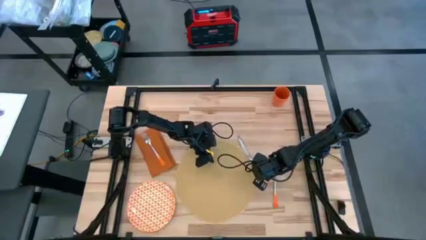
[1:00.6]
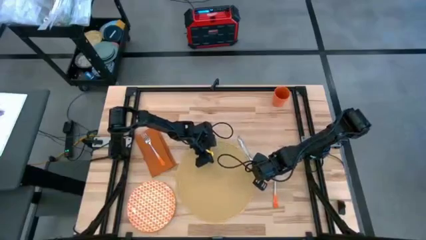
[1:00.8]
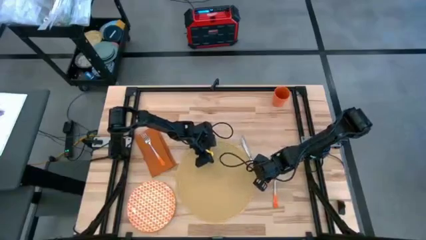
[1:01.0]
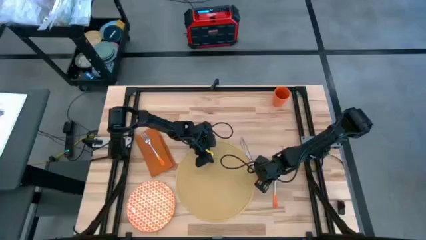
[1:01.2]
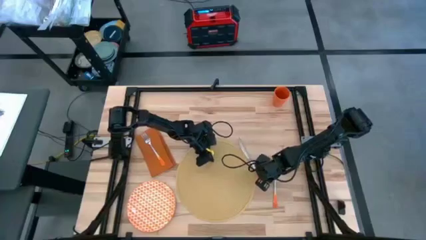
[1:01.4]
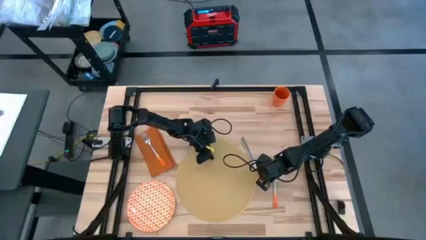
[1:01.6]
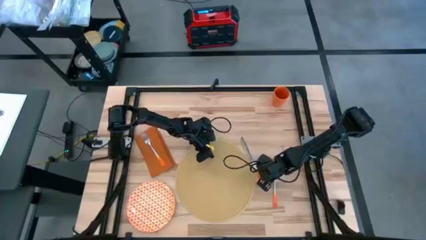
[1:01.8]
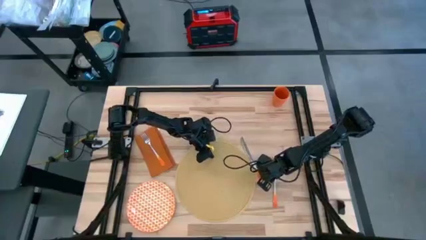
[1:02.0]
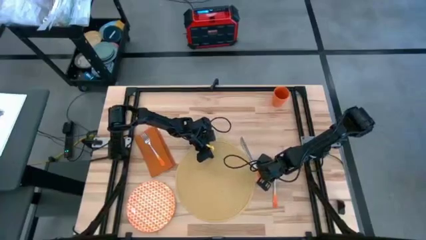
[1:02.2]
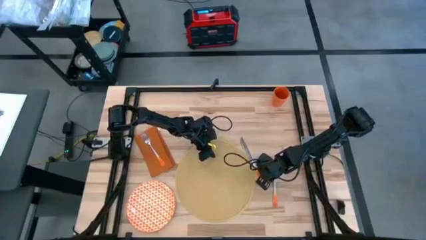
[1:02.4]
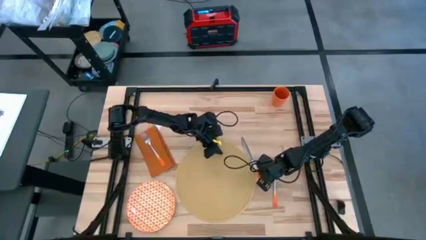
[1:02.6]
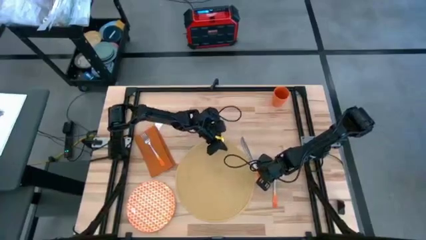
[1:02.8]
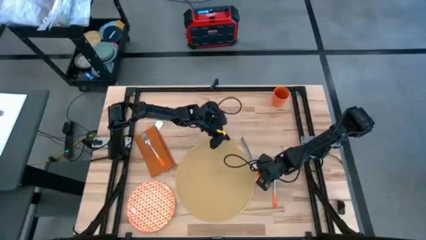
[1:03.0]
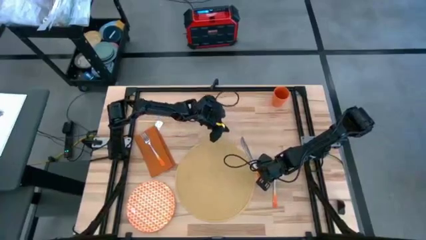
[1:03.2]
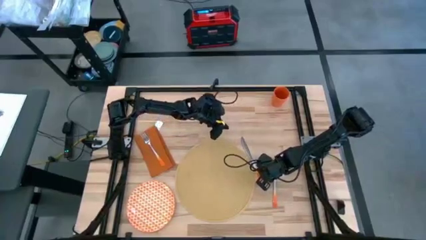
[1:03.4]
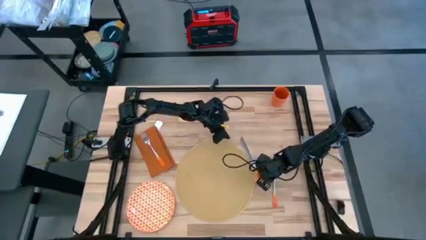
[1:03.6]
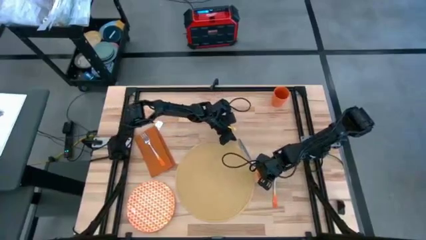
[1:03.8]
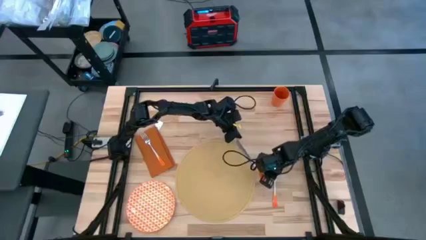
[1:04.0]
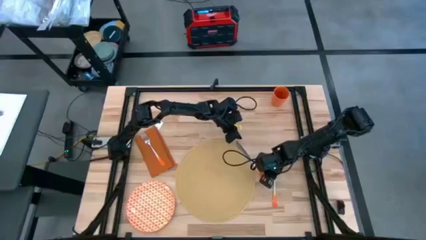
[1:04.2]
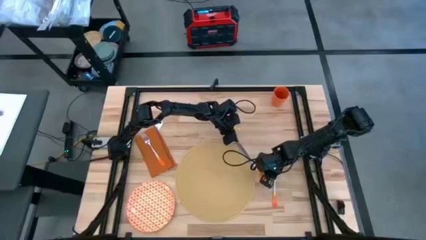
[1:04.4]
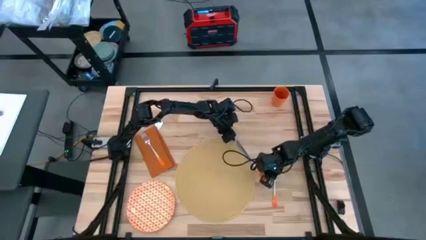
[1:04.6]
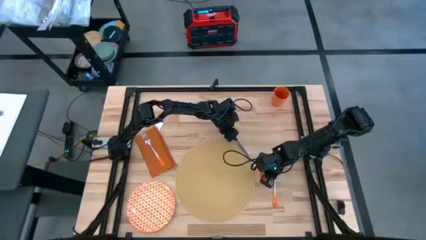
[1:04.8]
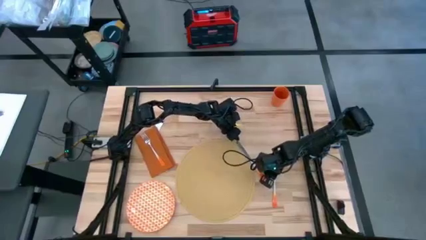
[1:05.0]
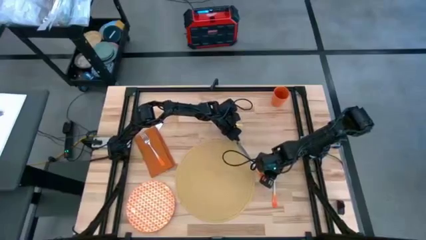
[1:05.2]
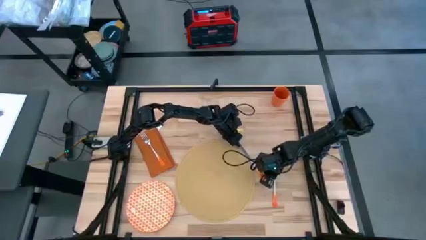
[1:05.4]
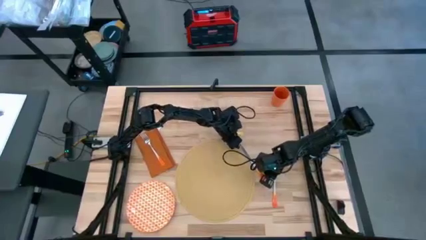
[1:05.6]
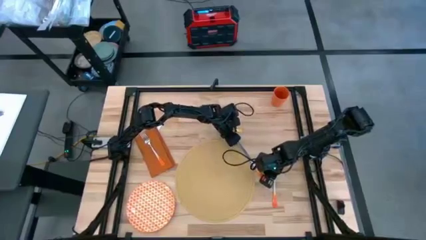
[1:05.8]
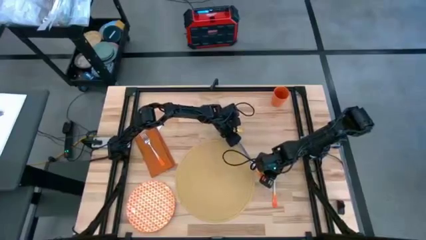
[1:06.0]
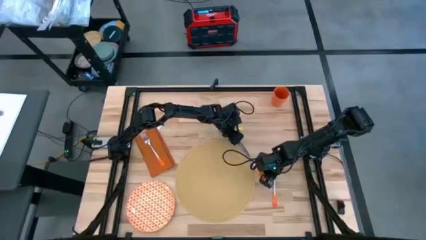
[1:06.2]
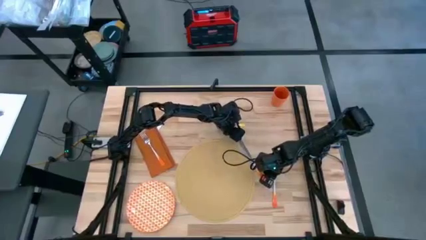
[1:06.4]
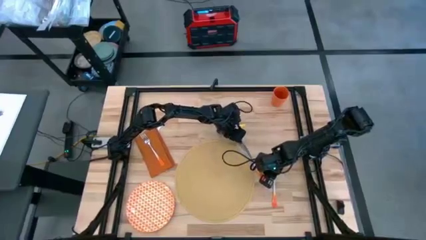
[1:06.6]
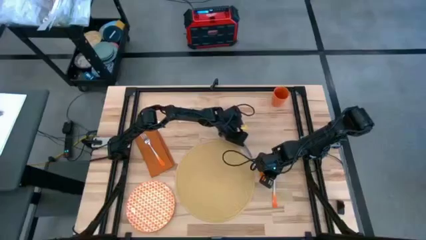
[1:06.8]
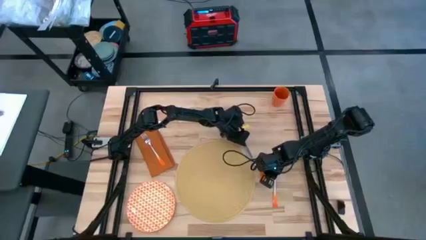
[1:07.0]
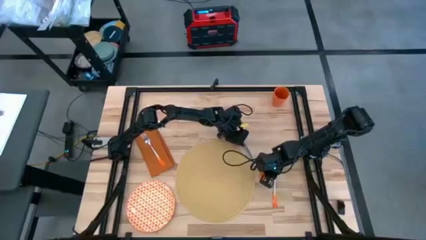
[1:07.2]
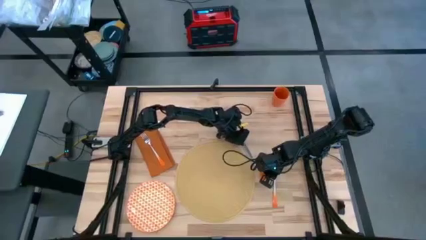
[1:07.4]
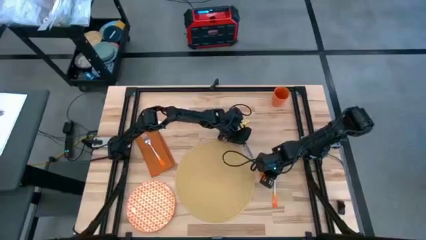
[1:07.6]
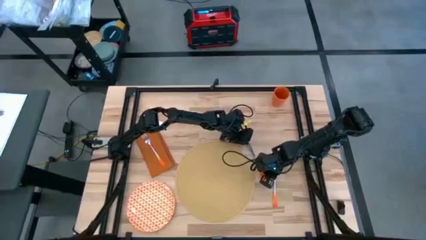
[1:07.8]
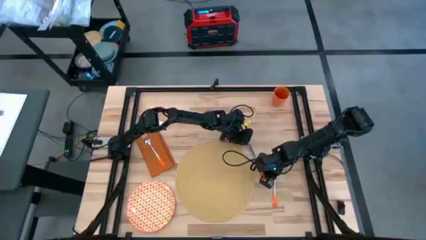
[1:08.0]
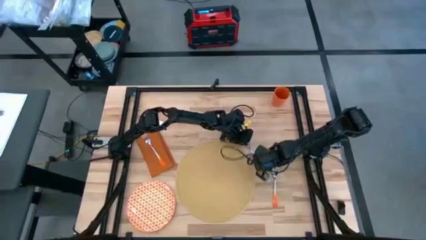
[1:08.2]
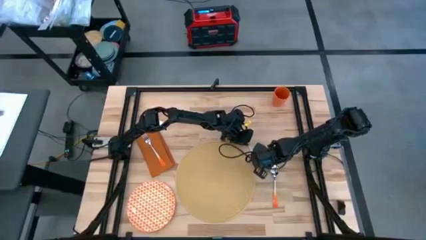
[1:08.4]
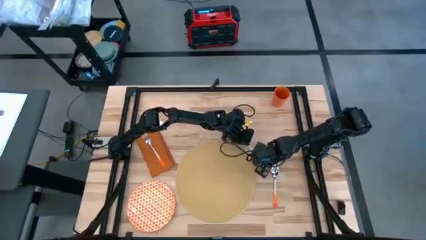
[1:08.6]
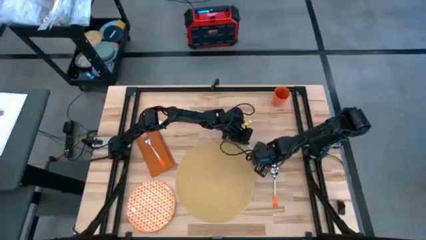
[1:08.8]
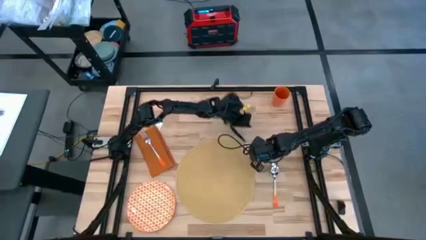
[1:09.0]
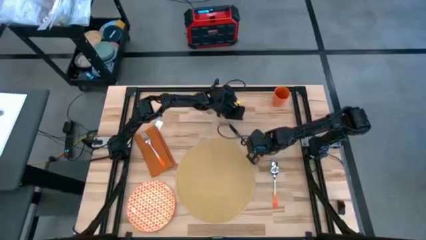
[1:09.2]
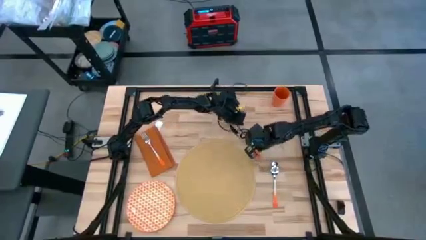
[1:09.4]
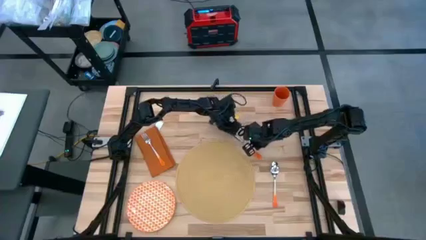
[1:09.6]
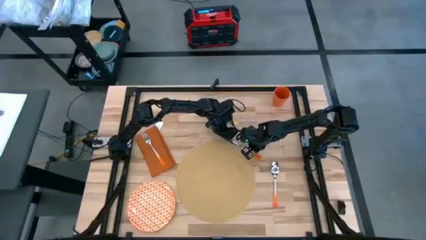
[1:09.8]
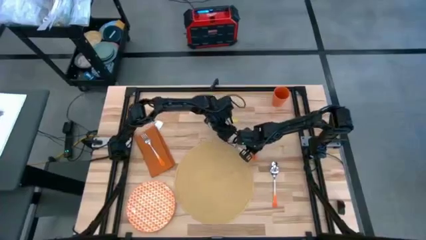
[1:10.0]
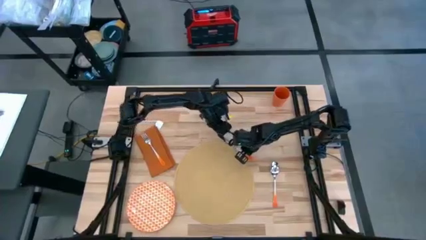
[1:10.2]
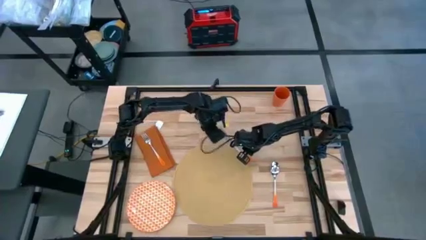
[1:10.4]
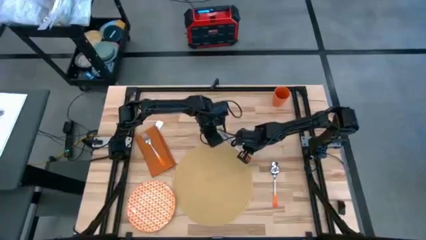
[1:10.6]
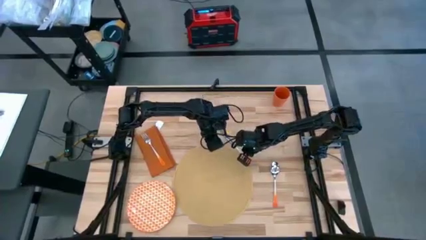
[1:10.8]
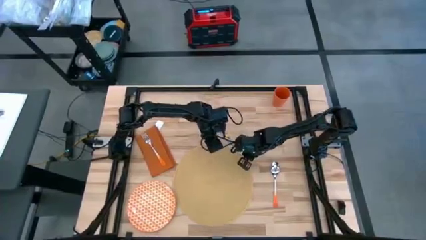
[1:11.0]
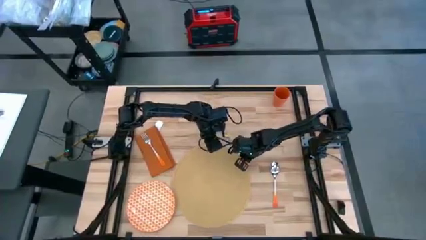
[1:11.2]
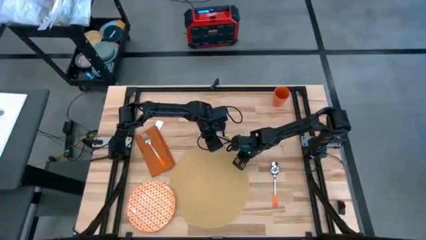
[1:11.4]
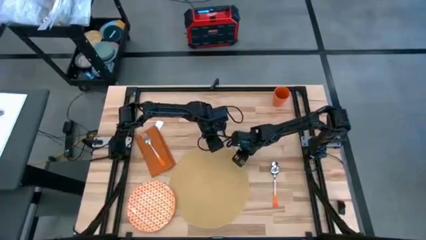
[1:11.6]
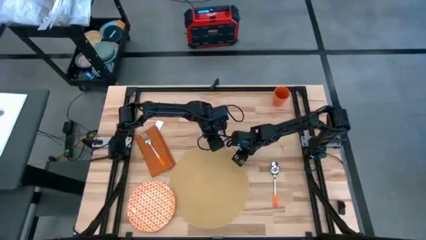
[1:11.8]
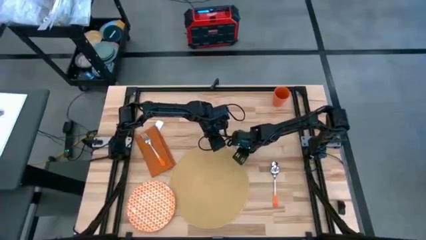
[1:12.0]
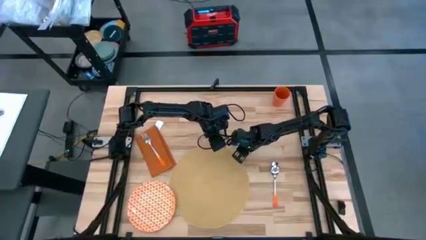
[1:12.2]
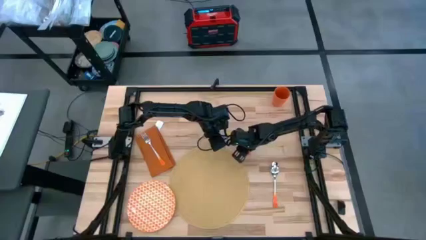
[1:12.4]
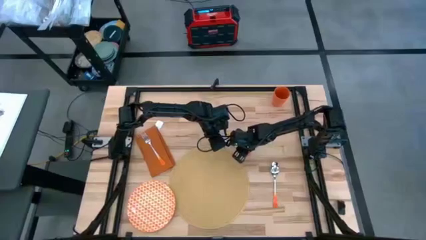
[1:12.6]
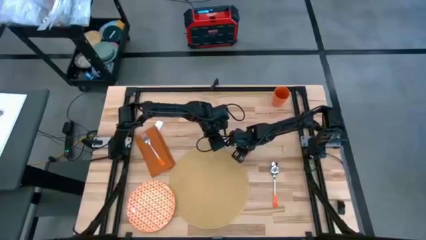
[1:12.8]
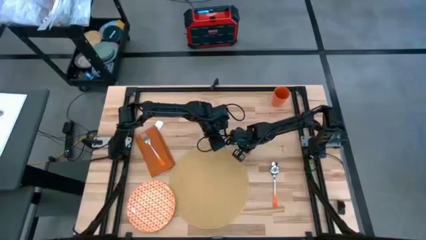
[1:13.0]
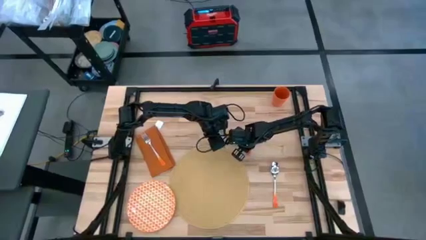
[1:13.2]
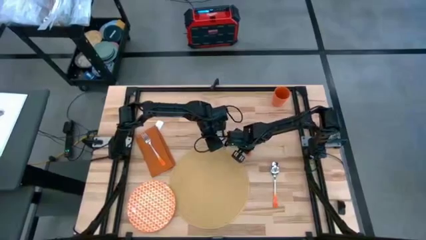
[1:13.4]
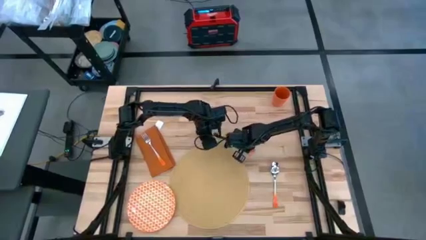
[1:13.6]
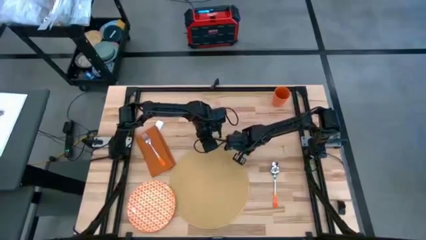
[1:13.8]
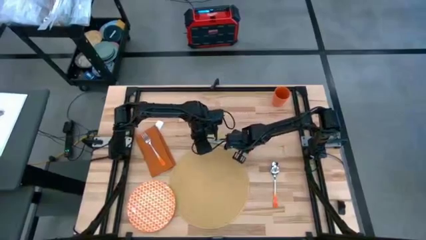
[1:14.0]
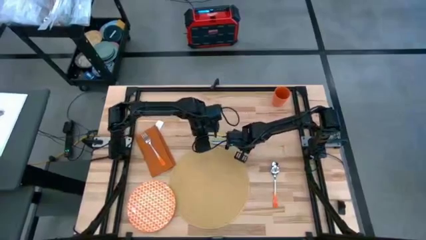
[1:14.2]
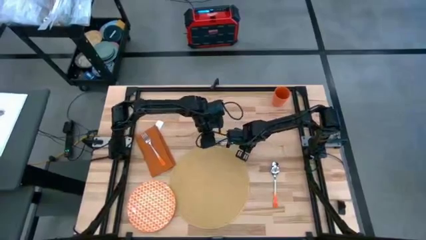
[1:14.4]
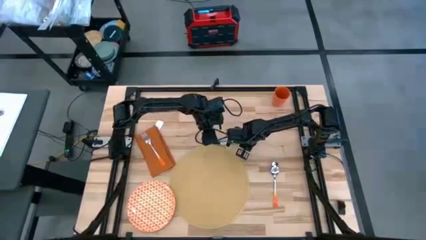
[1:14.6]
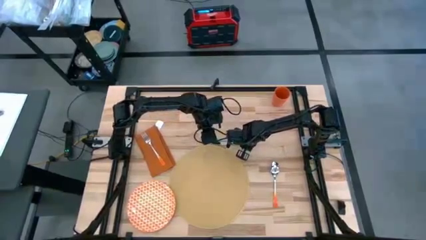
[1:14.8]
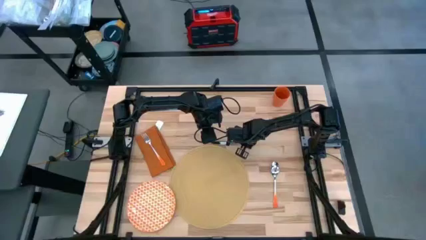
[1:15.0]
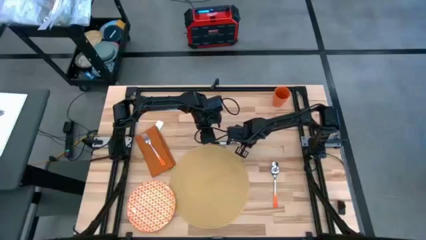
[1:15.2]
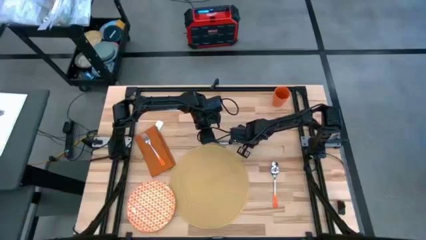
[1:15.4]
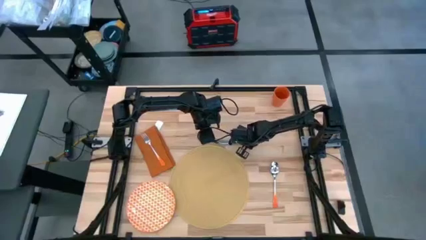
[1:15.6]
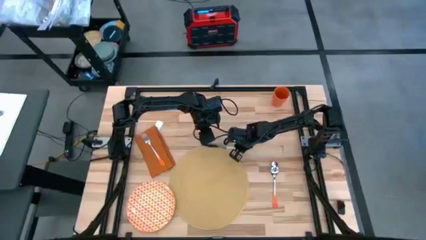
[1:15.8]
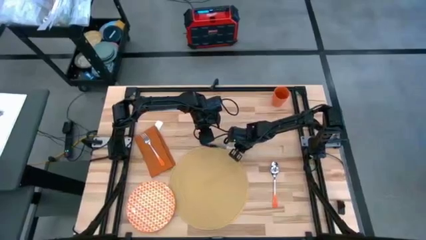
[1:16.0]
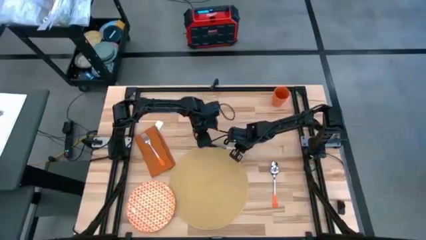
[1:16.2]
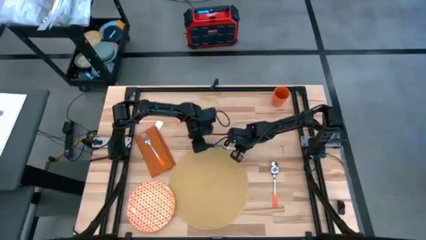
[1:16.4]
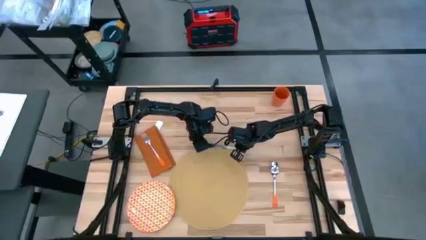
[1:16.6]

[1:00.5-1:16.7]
Task: Set table place
Put the table knife on the placemat

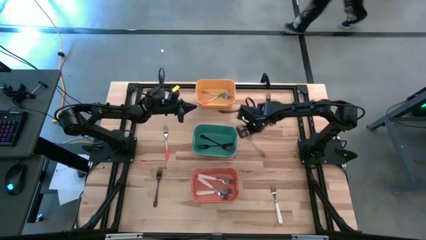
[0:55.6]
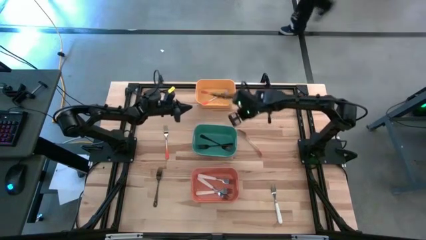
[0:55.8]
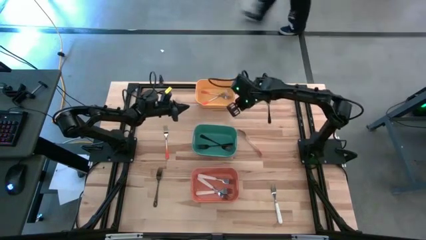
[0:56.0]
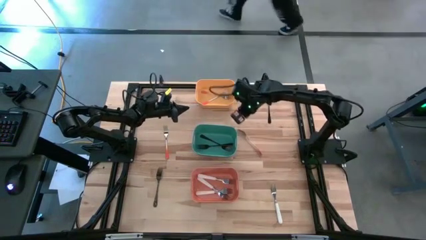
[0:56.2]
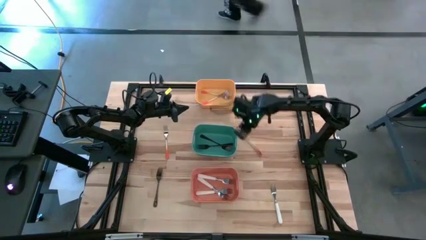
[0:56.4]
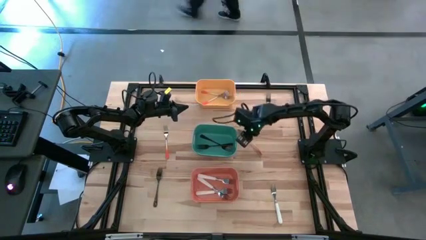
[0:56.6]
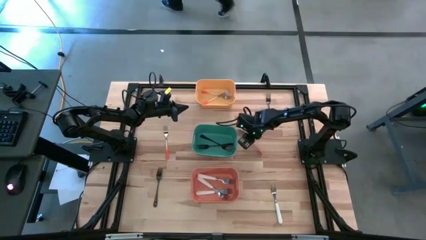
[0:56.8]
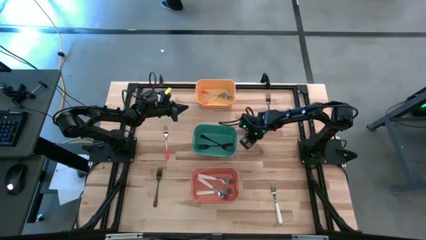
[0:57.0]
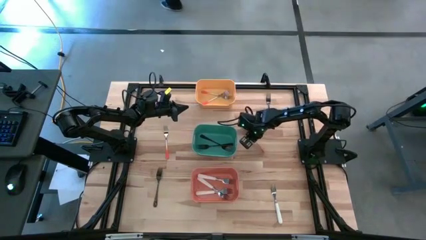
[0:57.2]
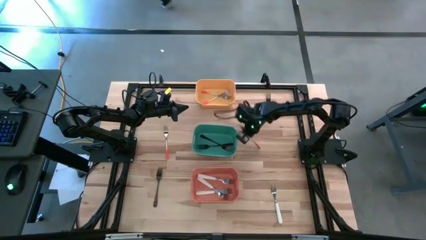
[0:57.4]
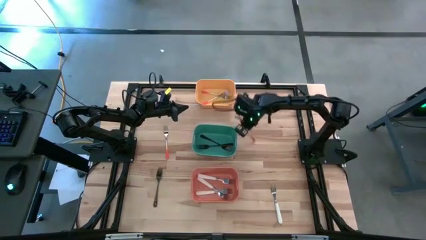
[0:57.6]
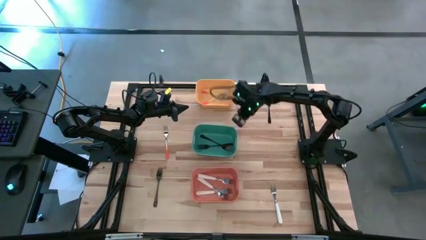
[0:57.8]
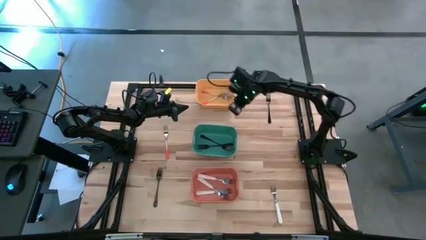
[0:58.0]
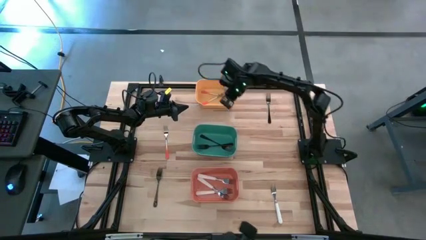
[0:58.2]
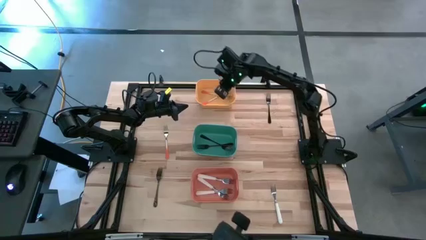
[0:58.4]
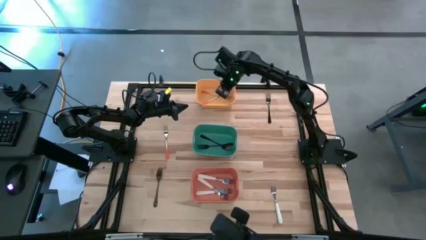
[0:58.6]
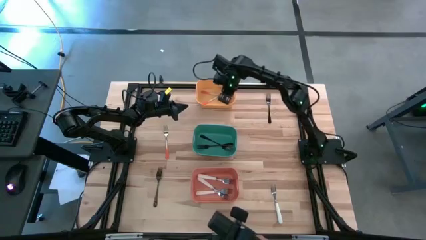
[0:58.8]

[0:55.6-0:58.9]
Task: Sort silverware by color (type)
Put the orange fork into the yellow bin
